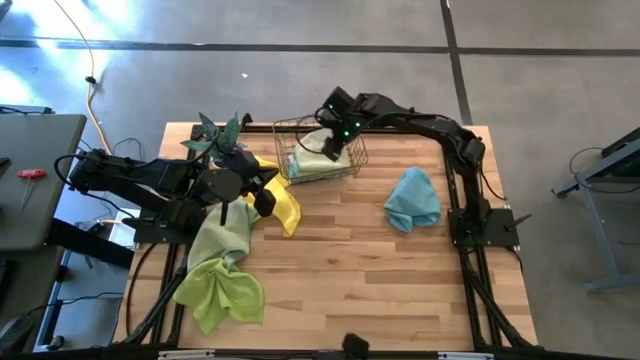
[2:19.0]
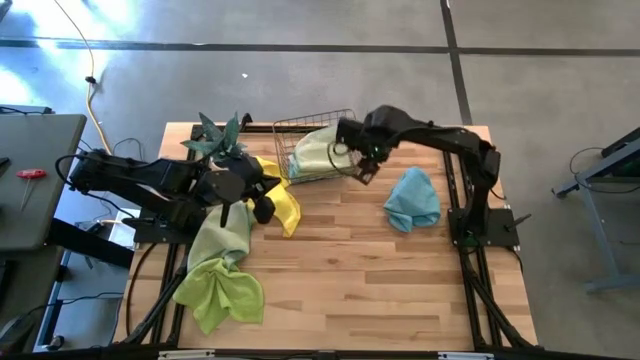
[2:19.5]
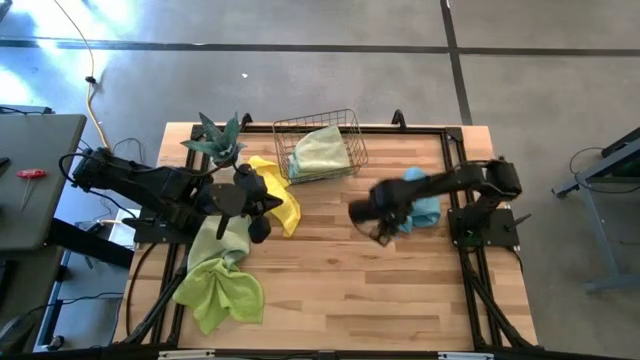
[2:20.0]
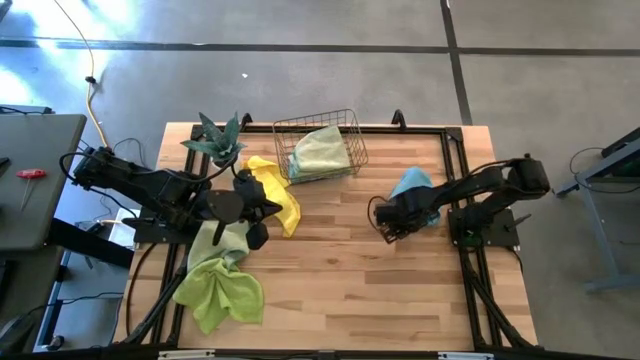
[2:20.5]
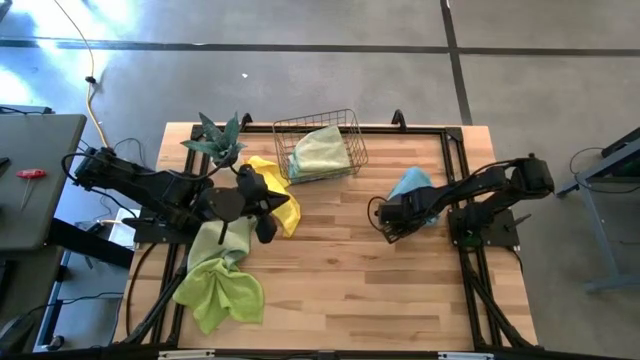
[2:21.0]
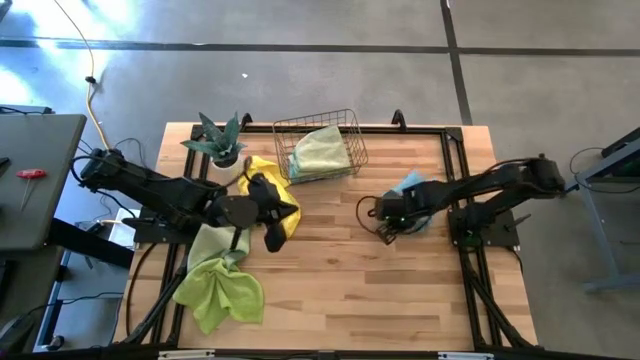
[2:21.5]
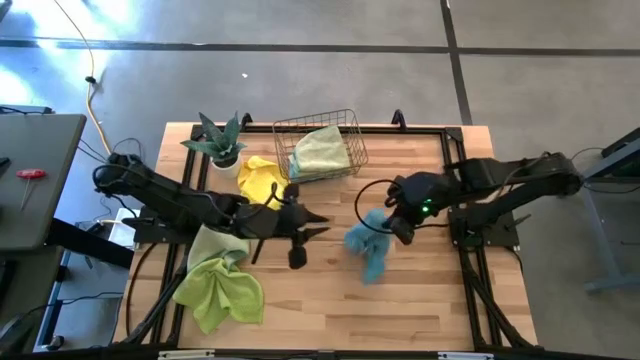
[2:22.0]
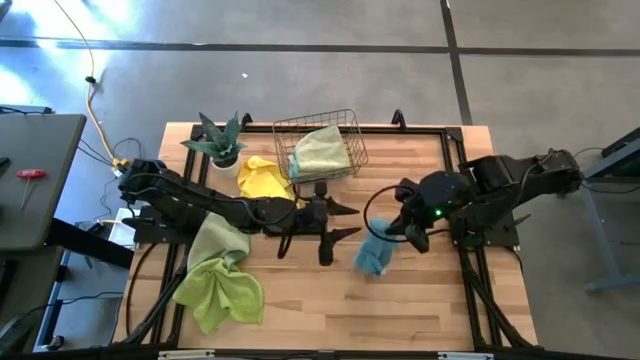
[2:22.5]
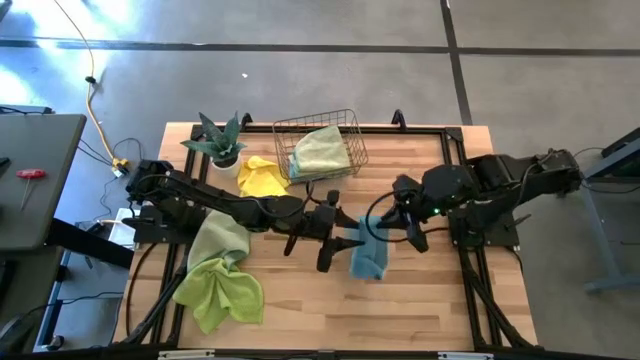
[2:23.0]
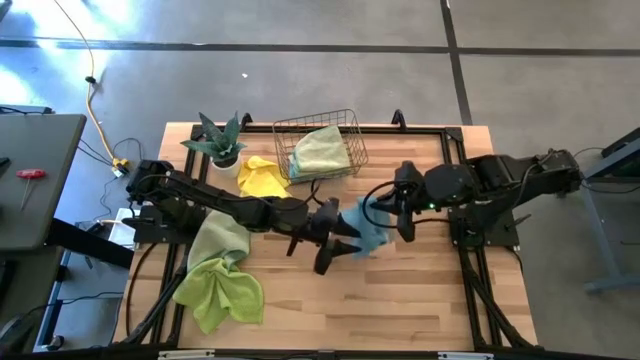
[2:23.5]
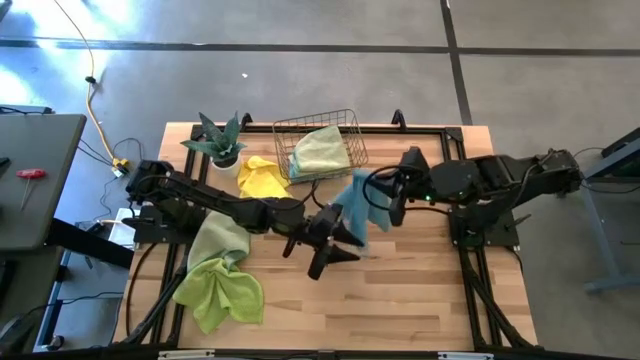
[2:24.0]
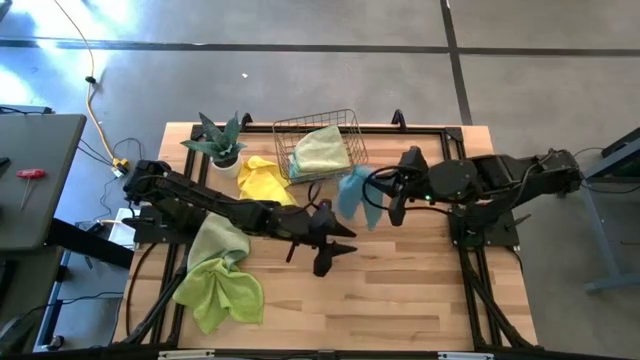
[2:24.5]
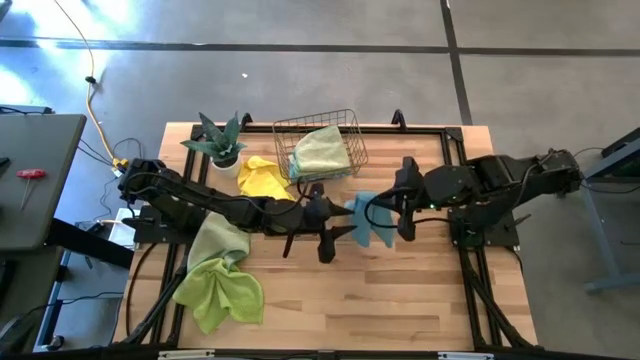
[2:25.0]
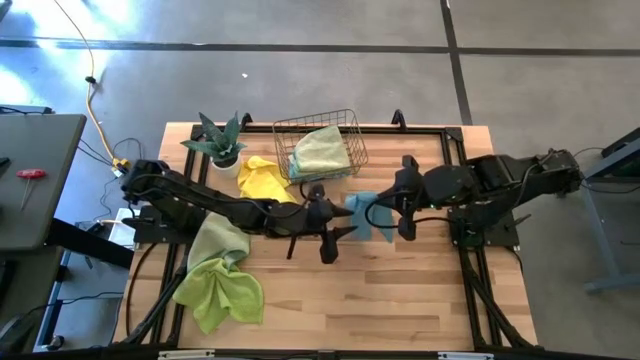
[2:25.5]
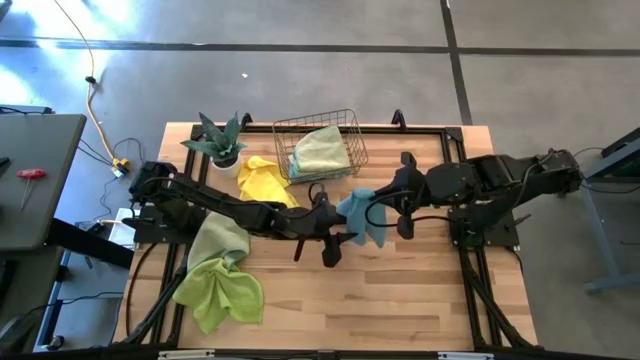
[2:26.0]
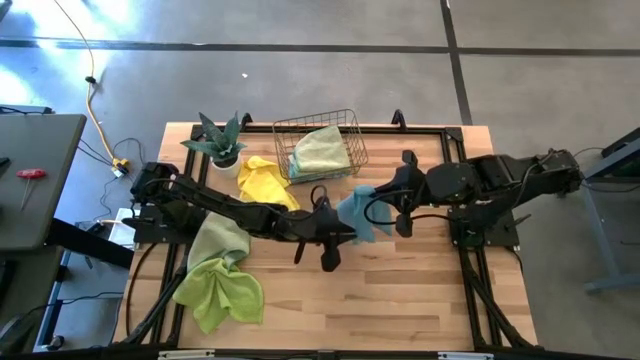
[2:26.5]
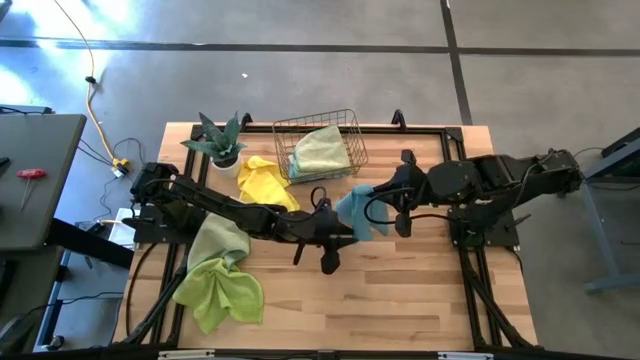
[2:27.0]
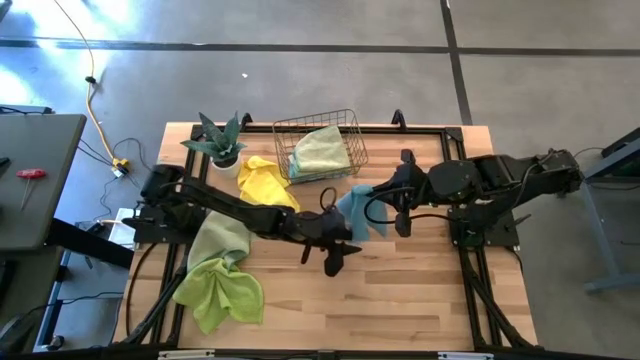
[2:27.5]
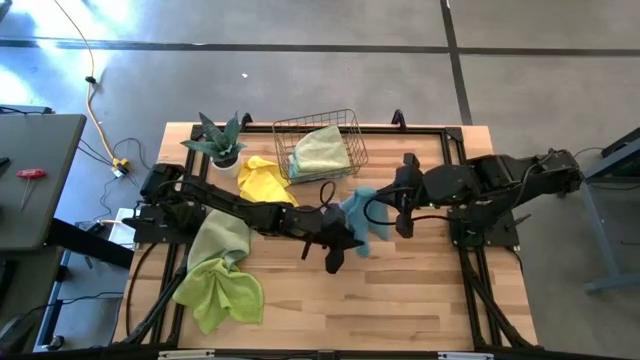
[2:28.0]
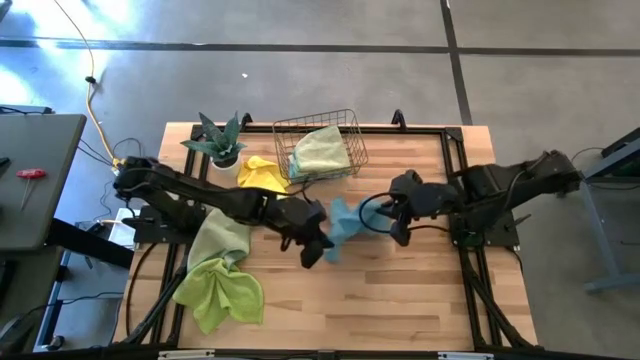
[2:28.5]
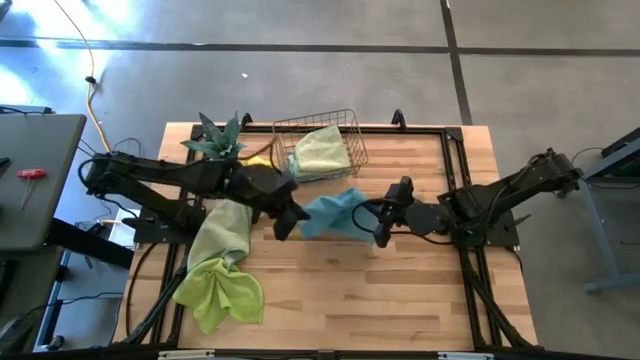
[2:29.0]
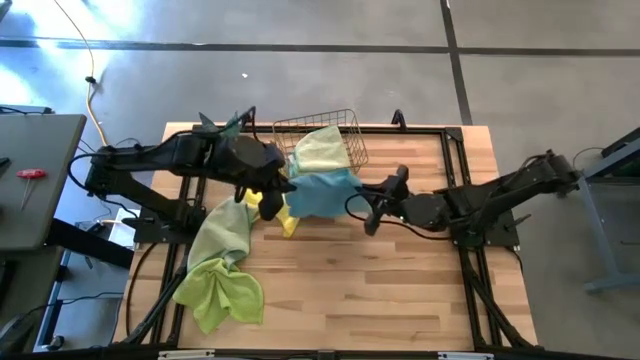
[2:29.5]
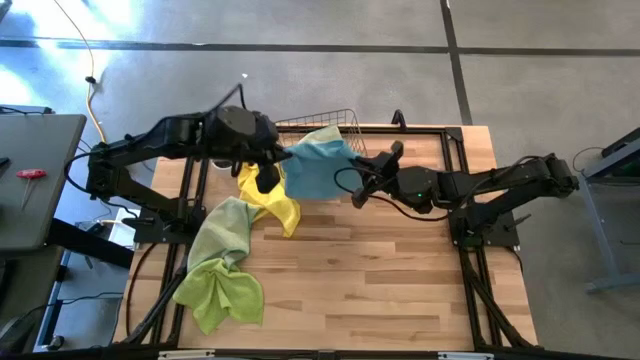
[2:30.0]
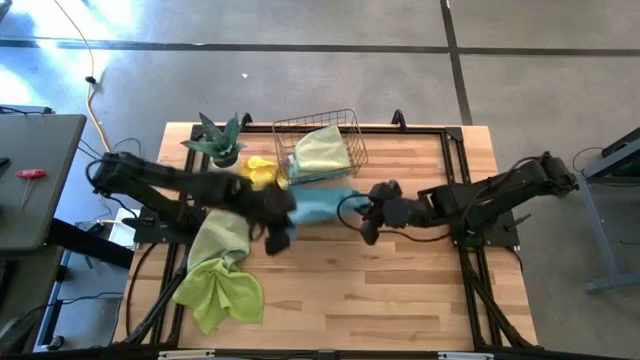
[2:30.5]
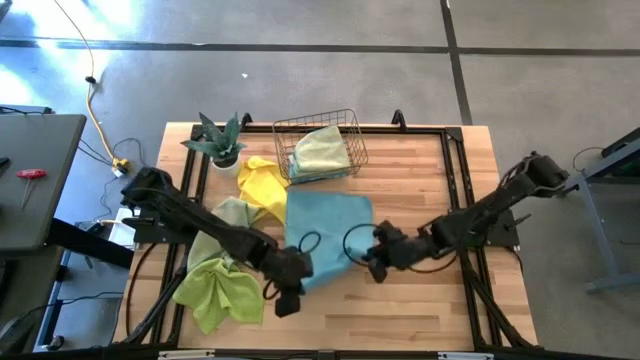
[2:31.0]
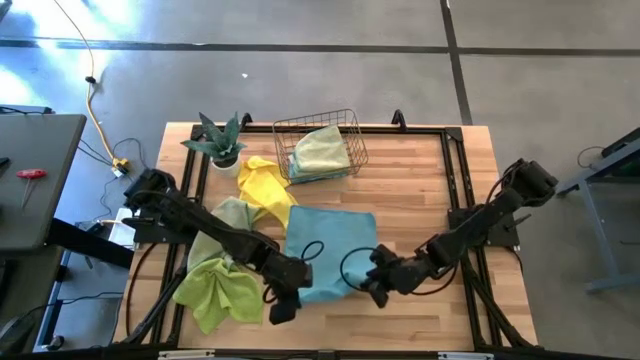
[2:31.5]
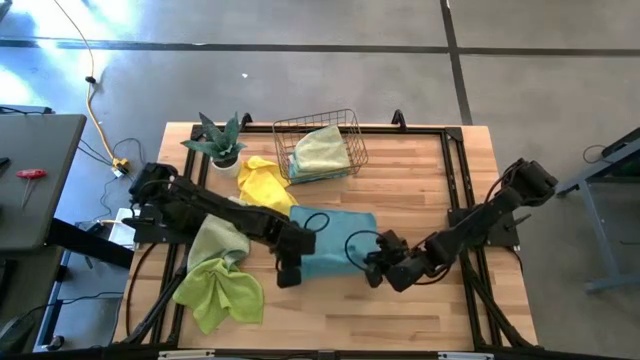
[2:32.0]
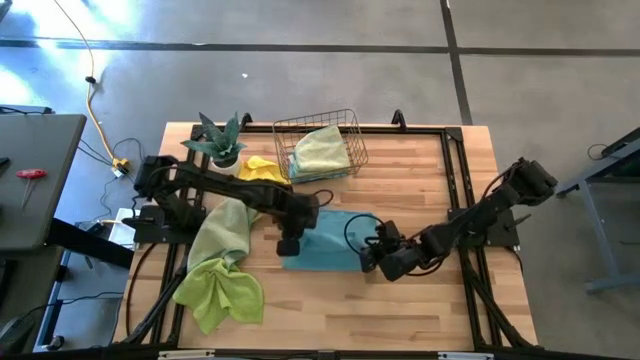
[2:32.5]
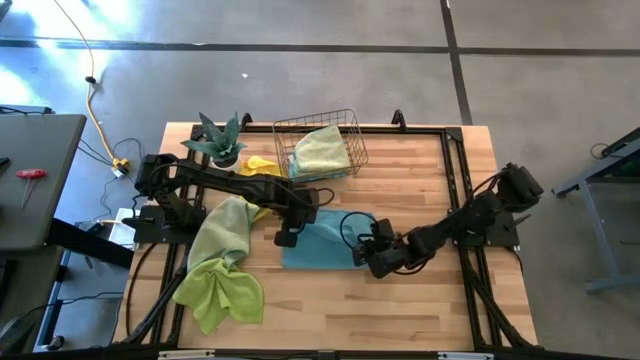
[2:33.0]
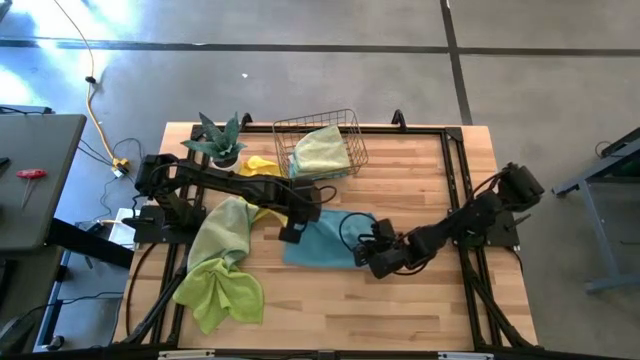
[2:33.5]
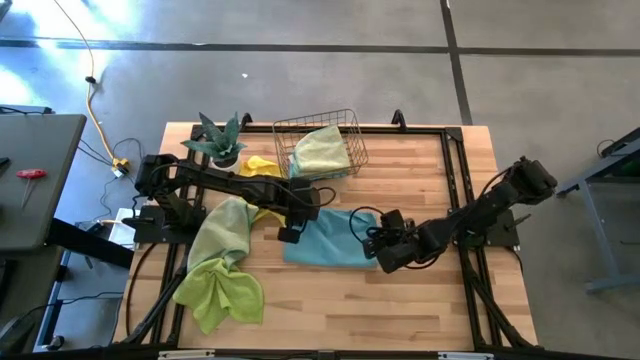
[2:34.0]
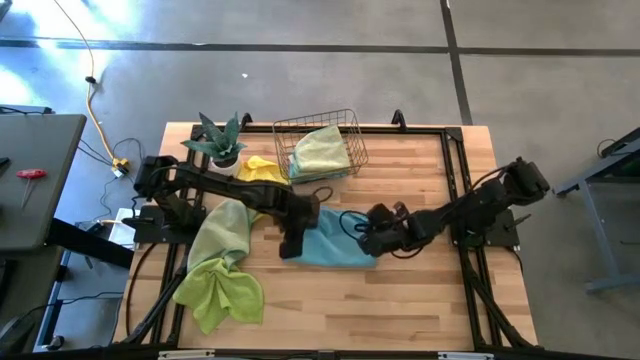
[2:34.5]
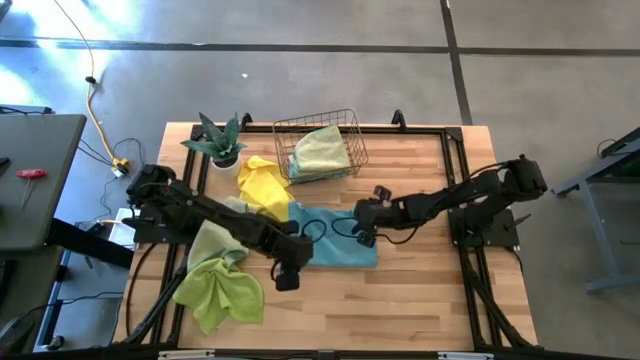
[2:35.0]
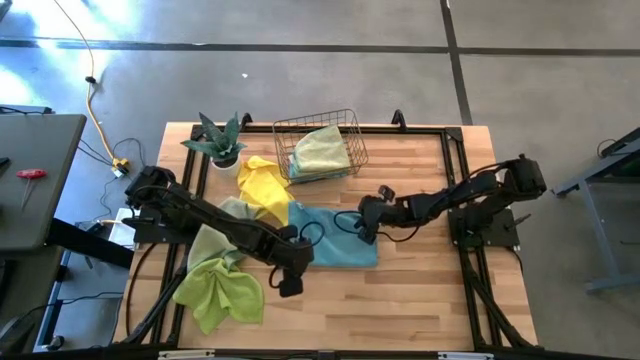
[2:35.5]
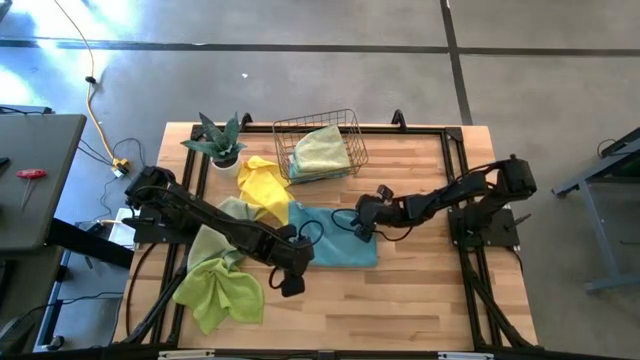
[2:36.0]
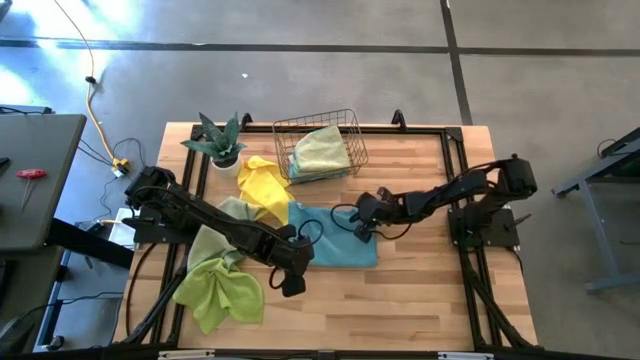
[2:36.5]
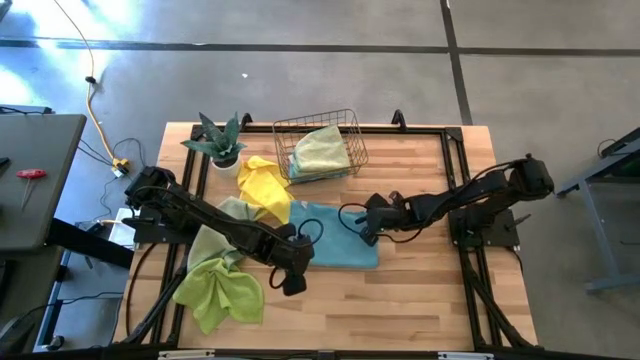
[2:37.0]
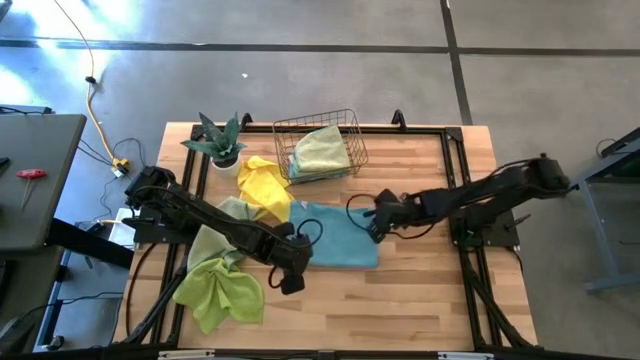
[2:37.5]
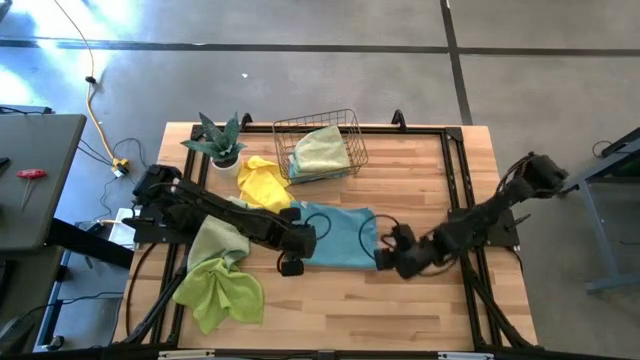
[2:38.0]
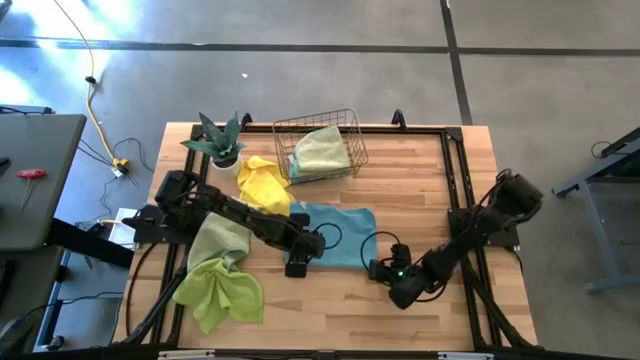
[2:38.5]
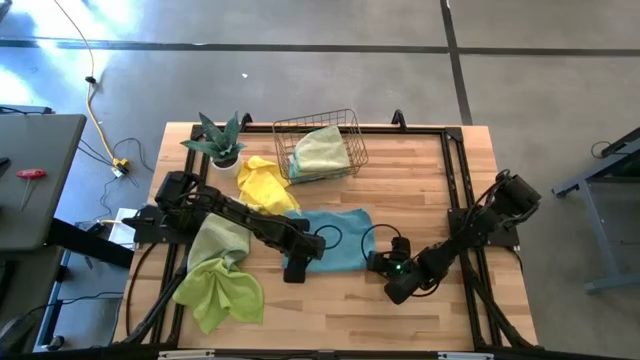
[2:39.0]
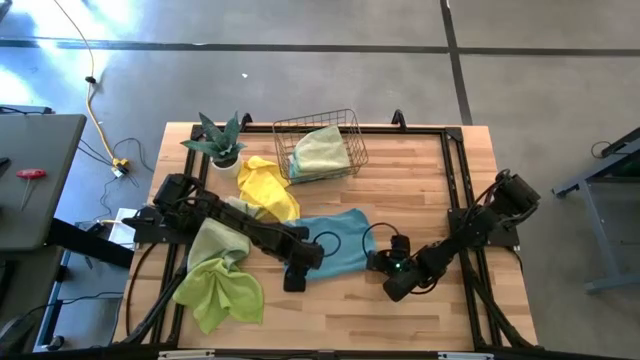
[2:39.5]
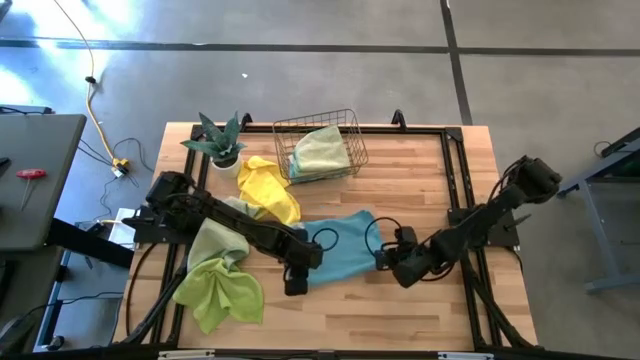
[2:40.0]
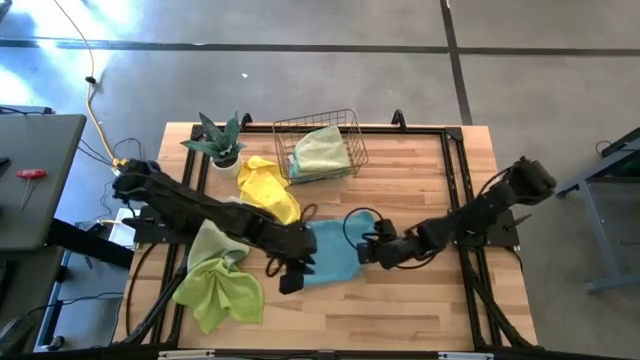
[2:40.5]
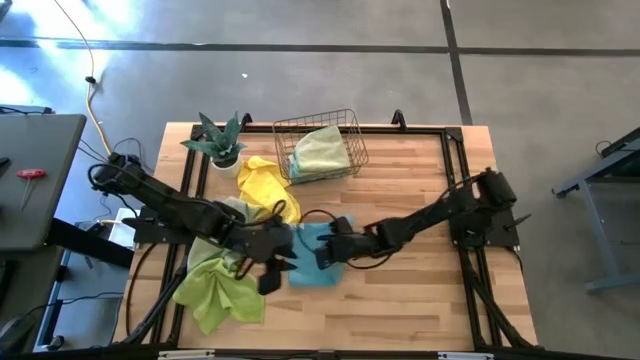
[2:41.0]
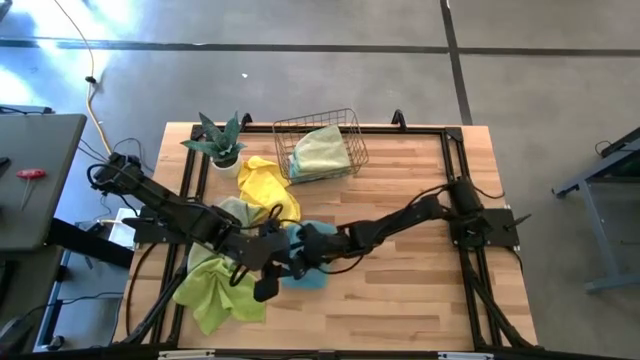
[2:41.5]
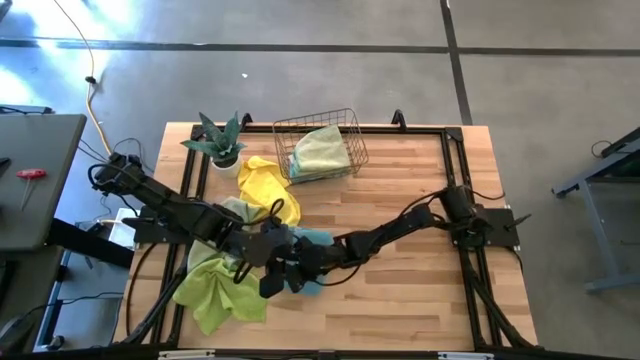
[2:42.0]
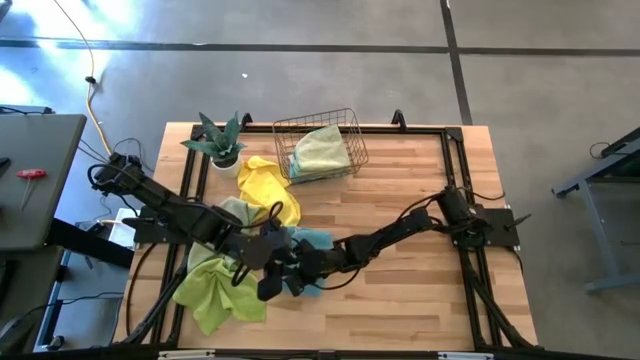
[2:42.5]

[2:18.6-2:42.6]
Task: Fold microfiber towels
Fold the blue microfiber cloth
